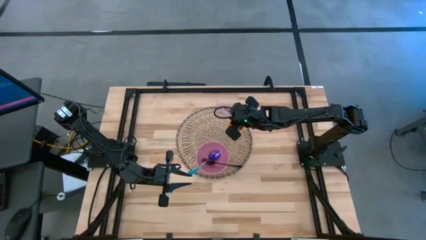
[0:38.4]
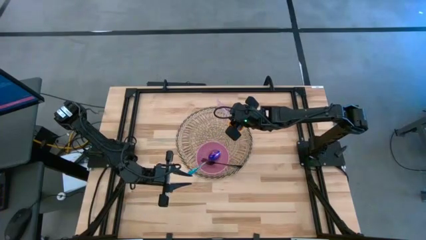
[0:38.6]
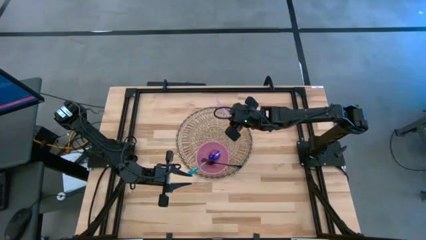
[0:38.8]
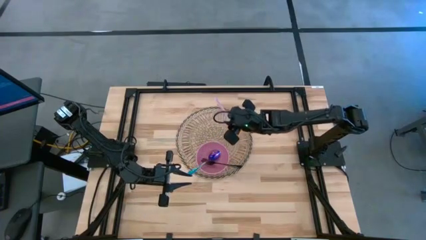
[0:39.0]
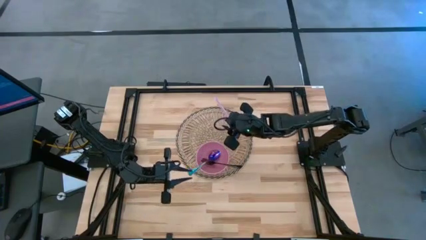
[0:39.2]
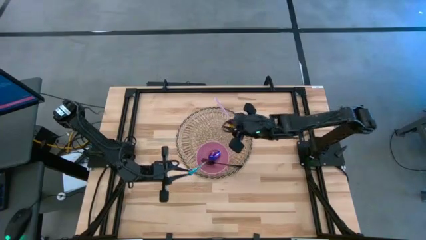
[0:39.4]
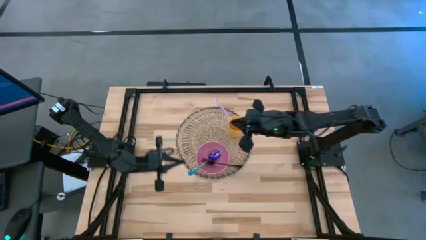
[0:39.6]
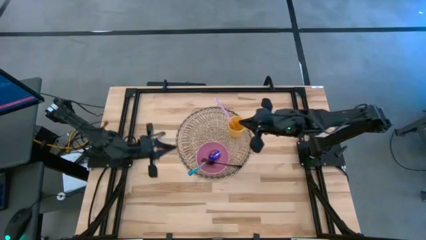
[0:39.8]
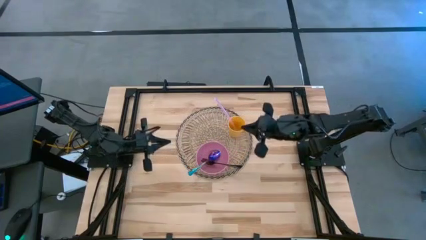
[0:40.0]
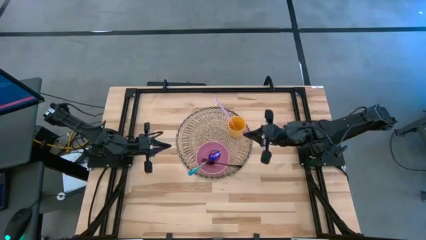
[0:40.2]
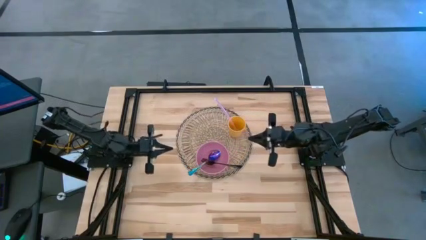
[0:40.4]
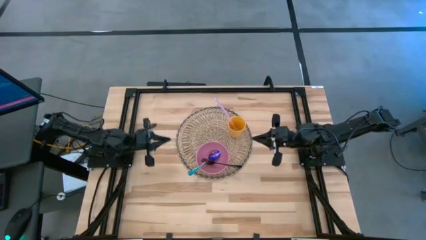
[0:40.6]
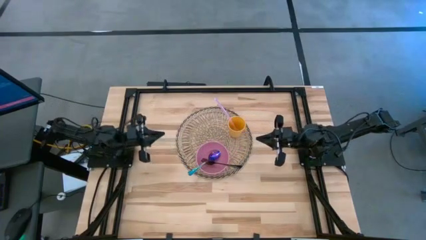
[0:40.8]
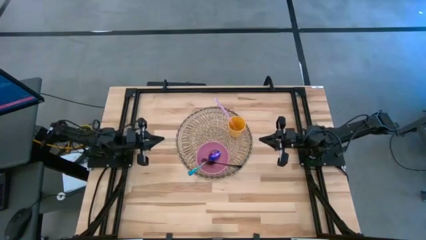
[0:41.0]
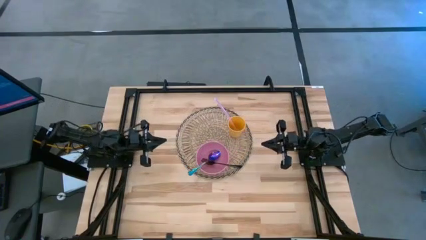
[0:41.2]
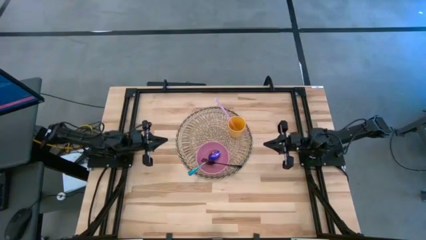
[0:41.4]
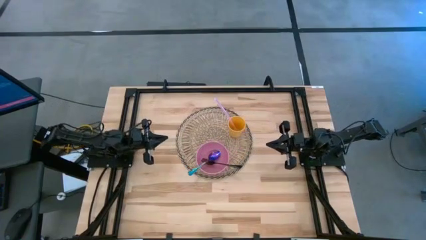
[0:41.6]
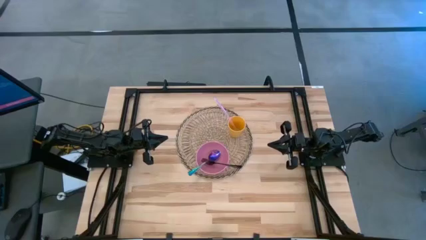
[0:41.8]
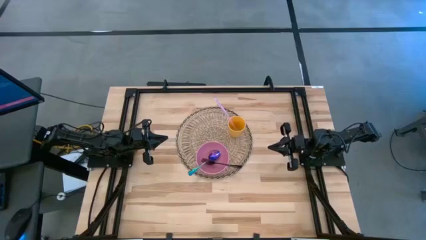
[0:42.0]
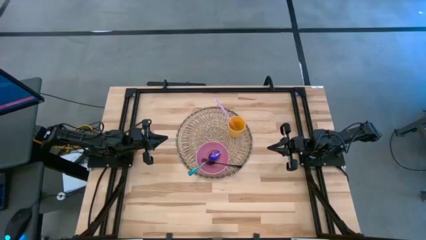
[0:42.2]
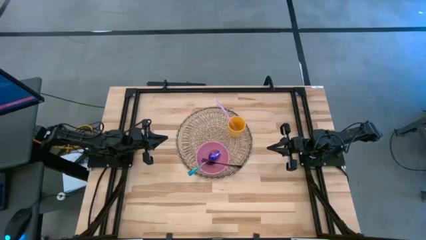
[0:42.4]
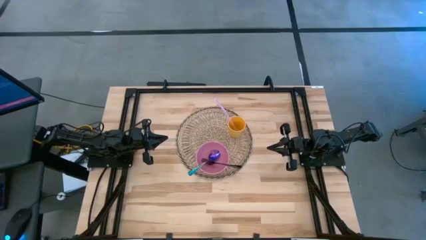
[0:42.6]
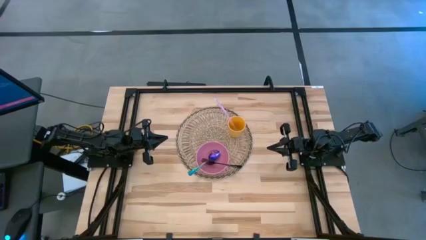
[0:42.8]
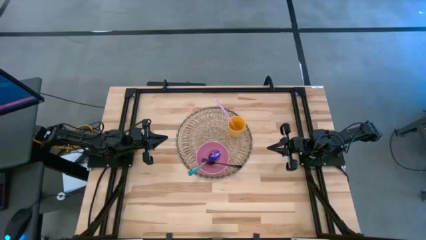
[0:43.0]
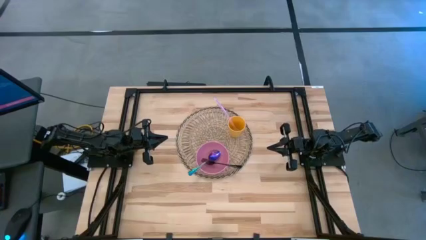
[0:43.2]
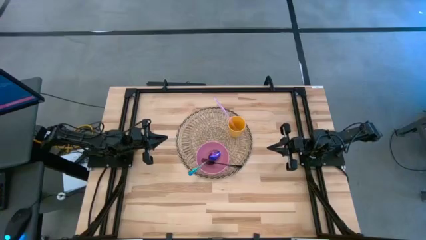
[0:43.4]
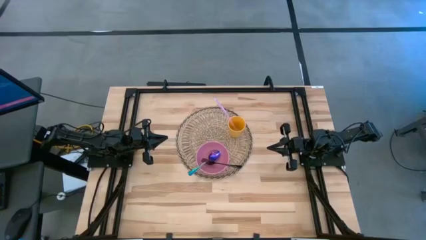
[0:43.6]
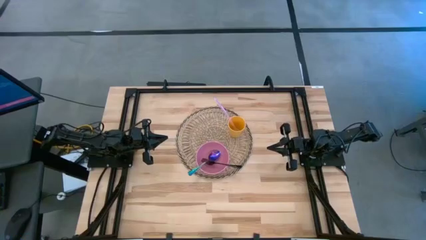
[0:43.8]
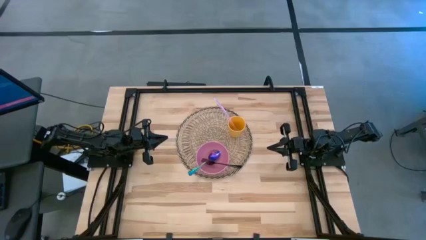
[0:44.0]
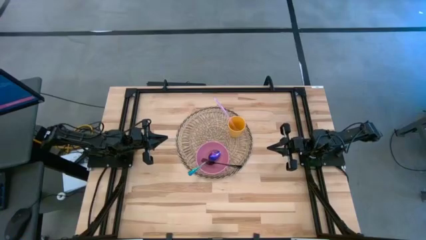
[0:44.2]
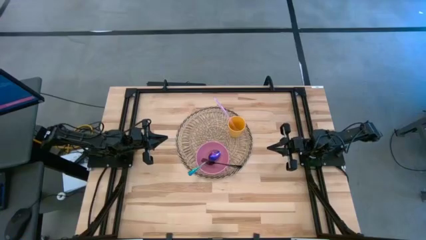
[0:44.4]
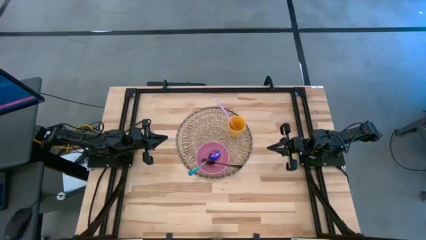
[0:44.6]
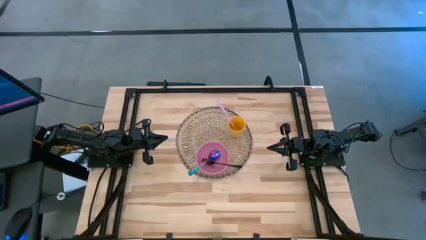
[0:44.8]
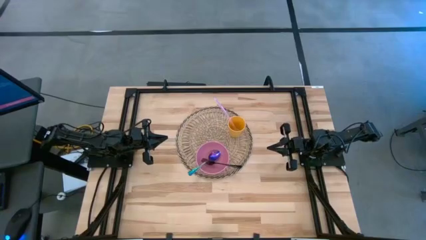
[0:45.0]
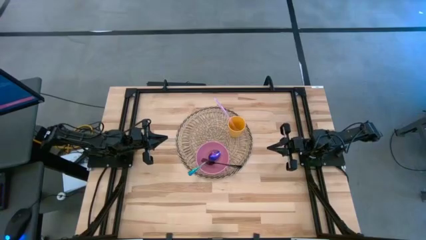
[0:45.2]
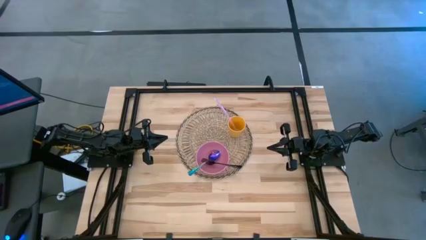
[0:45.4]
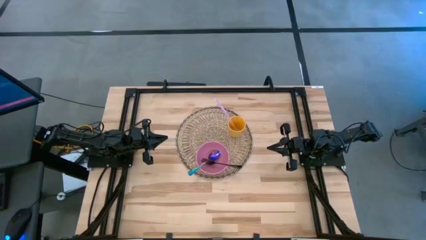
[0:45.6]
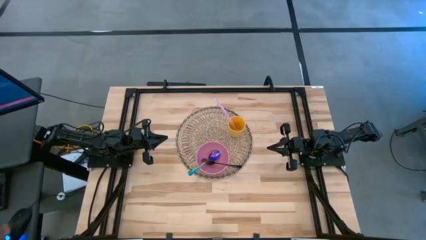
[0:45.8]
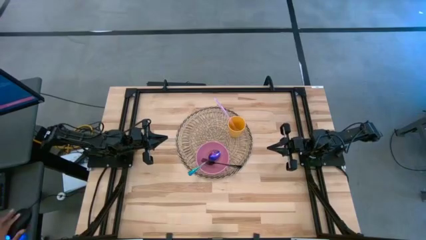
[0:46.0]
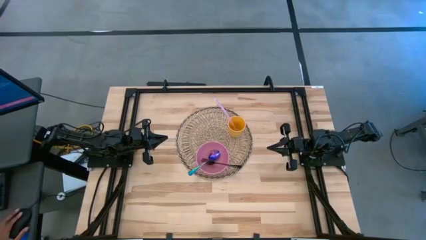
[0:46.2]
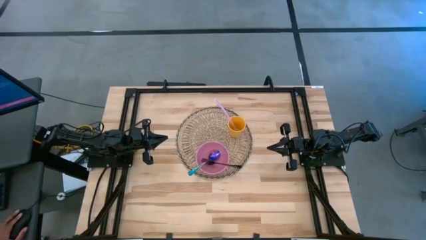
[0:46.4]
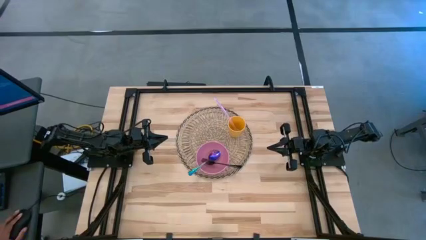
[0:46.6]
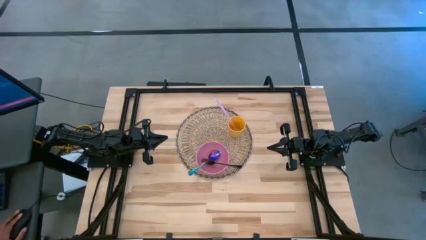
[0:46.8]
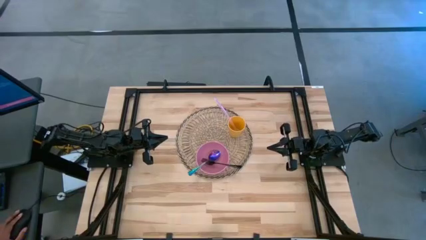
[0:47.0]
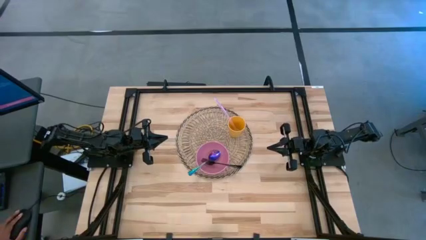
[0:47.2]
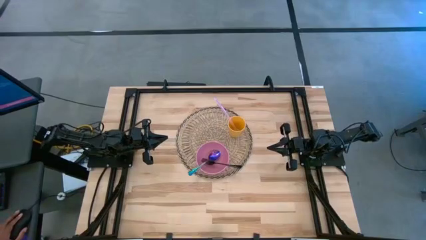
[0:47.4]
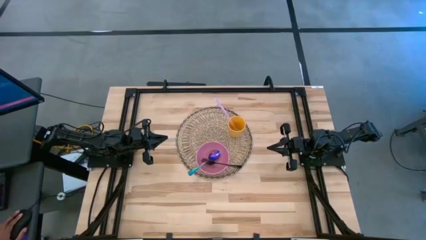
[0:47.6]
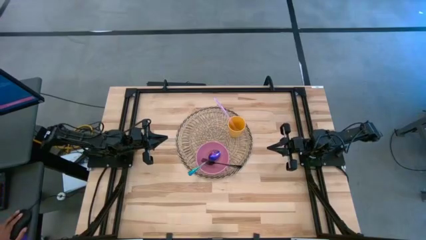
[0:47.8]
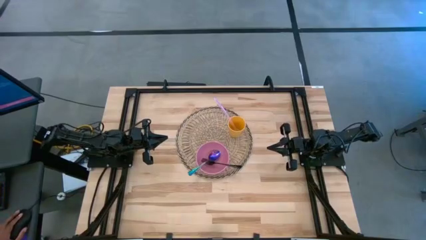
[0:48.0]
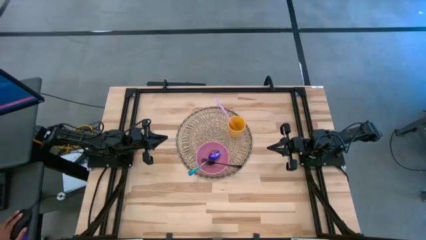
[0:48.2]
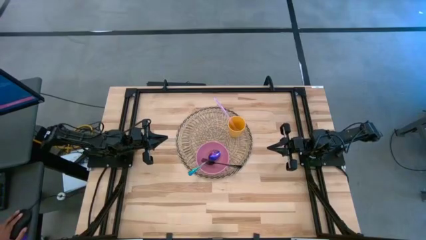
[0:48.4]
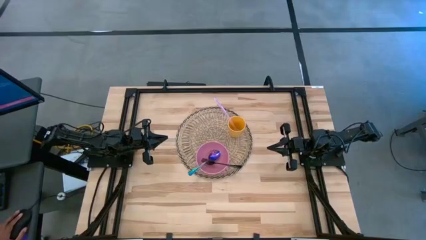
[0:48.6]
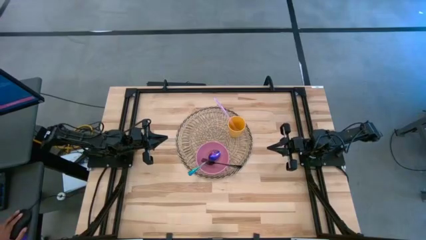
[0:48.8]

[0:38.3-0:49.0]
Task: Pick & Place Utensil
Return to Home Position

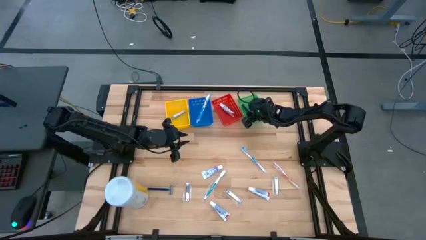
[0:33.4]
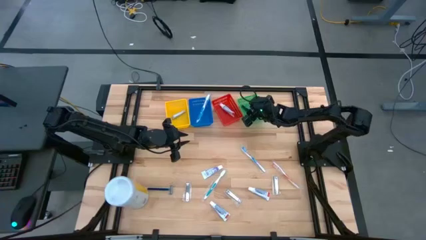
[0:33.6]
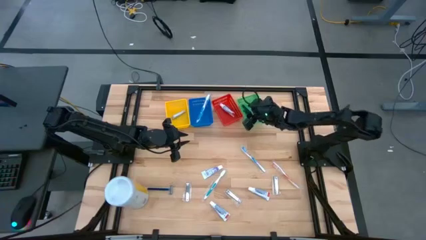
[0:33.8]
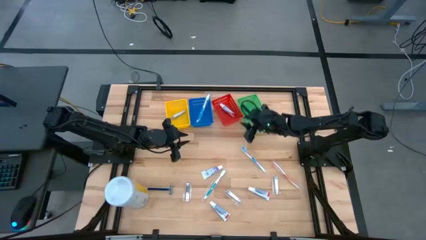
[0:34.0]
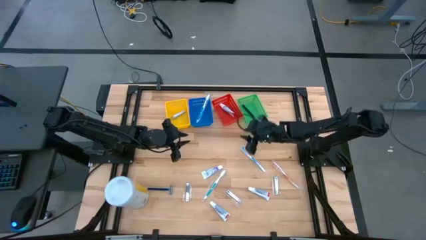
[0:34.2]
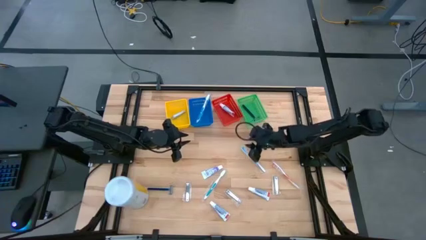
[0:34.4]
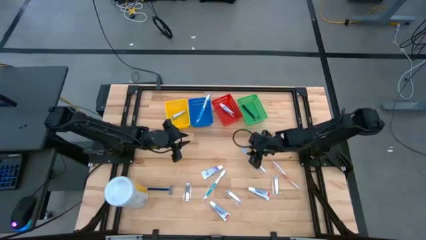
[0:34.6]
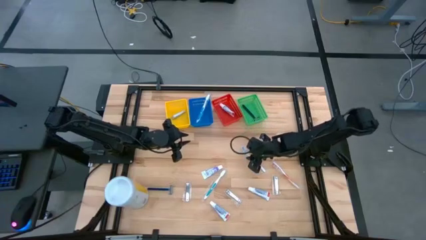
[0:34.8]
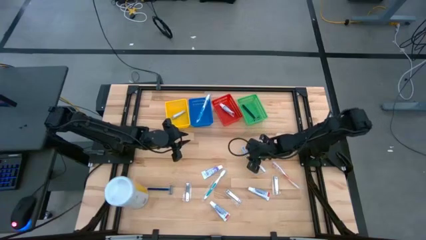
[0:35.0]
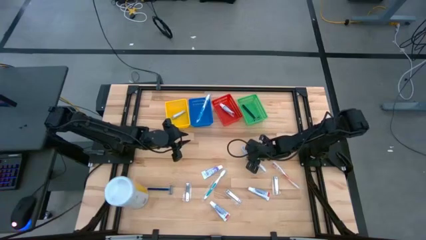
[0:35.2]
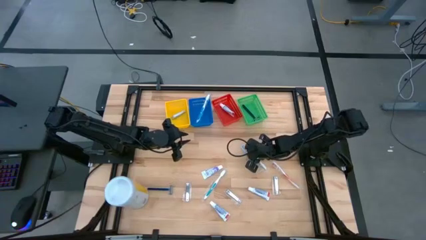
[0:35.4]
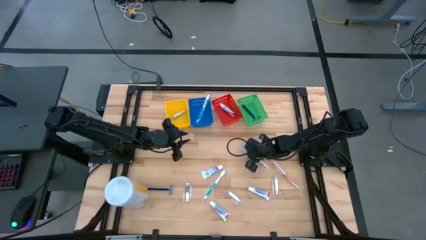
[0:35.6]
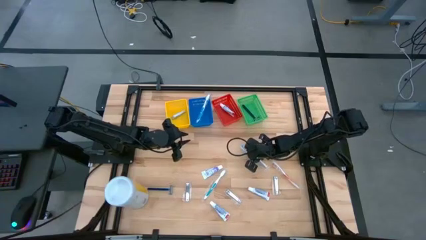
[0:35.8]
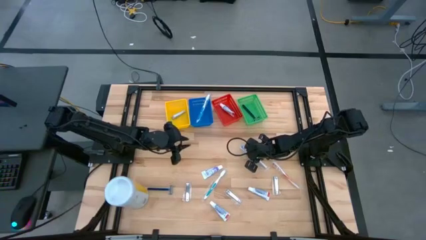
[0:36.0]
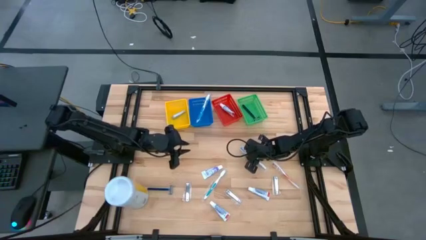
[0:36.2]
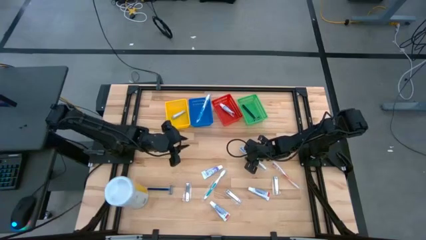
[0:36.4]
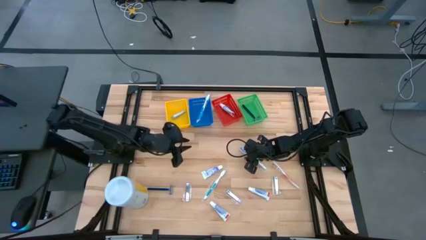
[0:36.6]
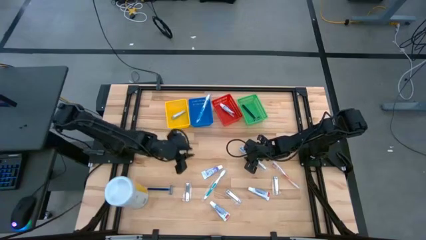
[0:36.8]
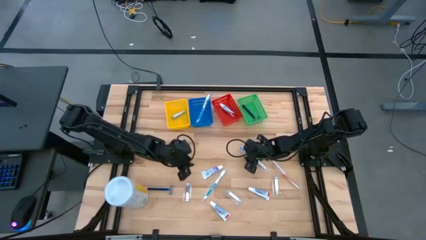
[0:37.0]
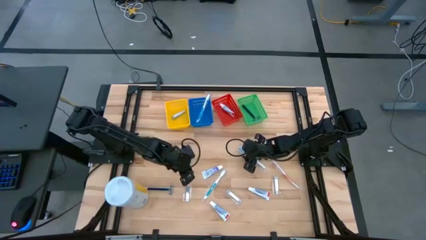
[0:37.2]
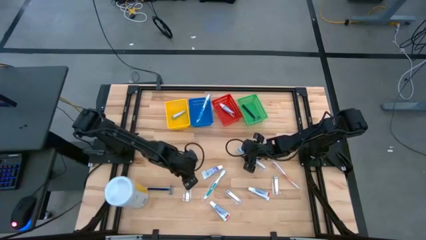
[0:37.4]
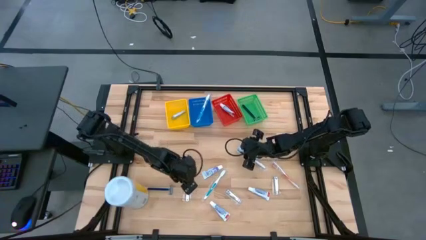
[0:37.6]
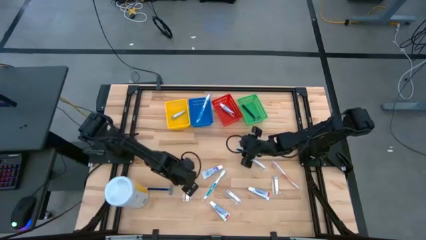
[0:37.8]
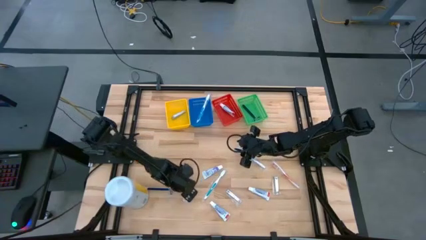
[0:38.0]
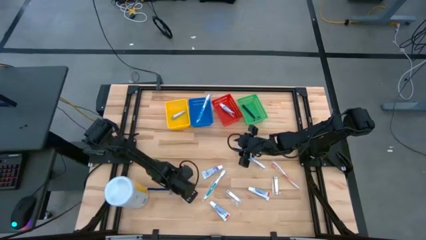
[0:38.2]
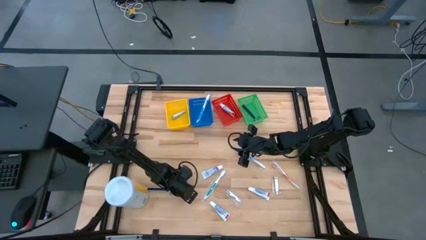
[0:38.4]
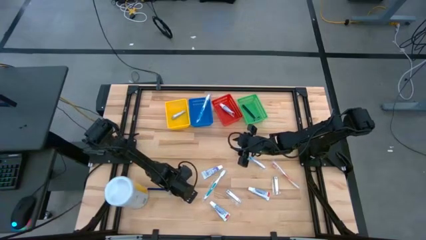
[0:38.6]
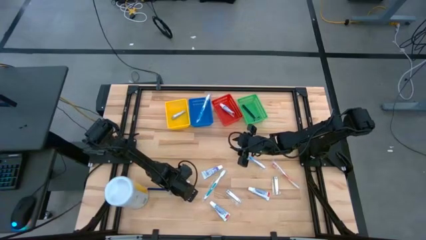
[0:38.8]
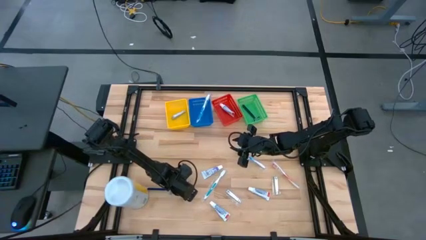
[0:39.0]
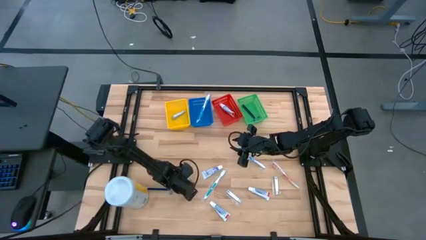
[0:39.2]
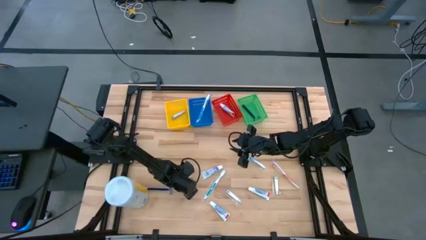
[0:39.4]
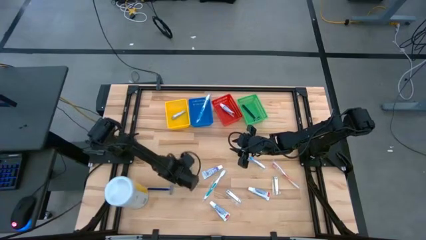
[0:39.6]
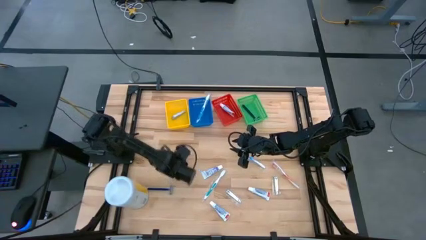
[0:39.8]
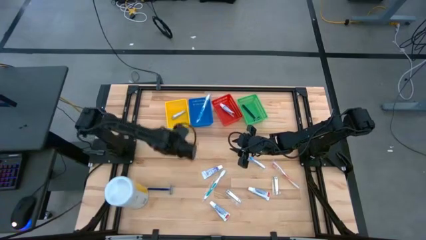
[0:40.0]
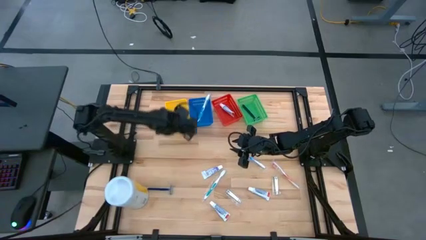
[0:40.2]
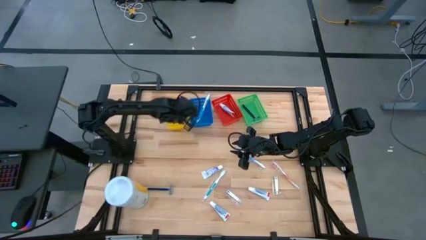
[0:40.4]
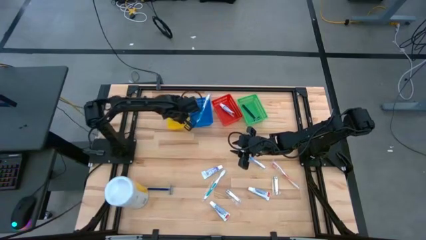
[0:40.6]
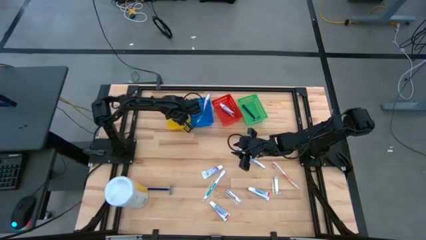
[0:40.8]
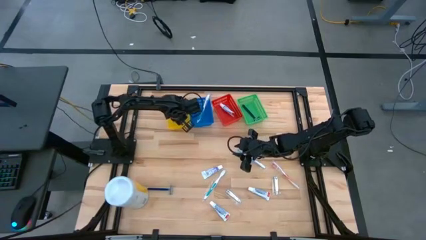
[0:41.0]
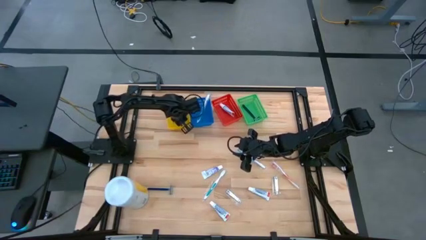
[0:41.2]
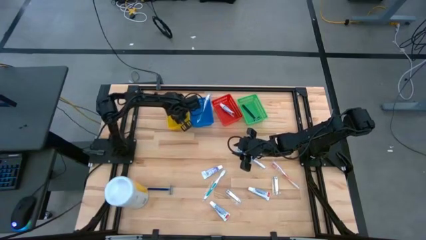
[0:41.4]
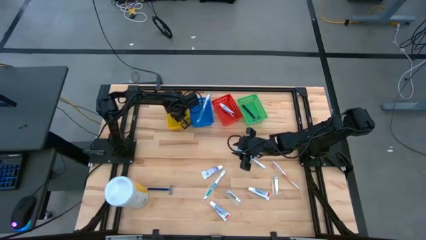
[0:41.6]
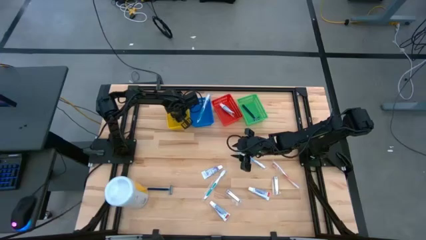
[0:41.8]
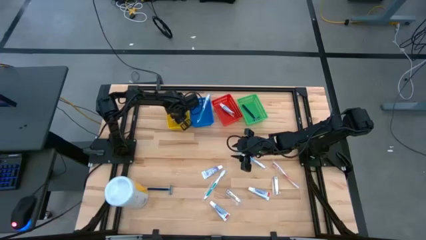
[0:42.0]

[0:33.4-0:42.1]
Task: Pick & Place Travel size toiletries
Put the left nail cutter into the yellow bin
